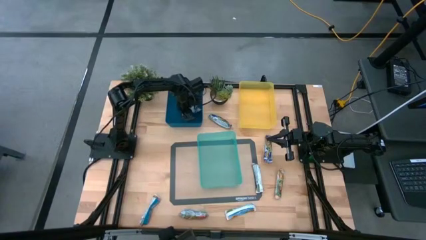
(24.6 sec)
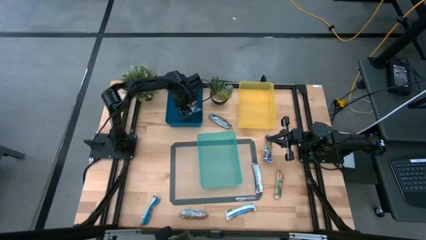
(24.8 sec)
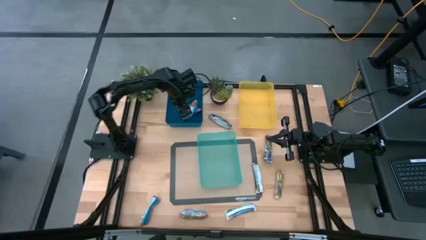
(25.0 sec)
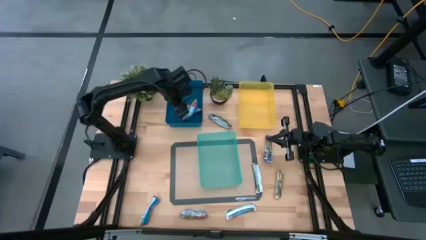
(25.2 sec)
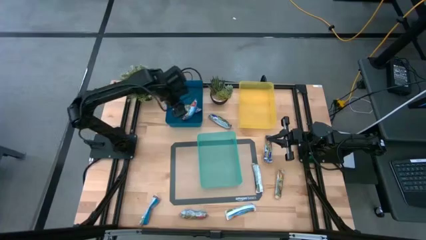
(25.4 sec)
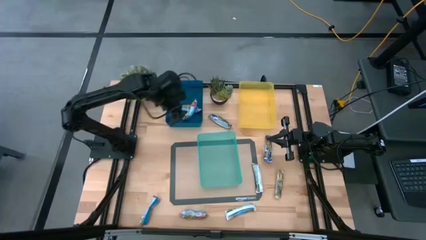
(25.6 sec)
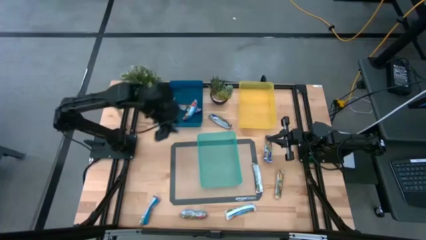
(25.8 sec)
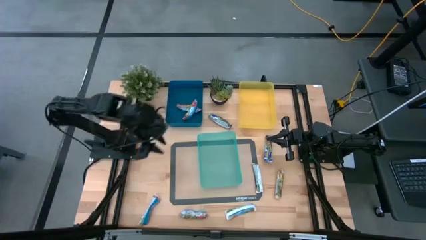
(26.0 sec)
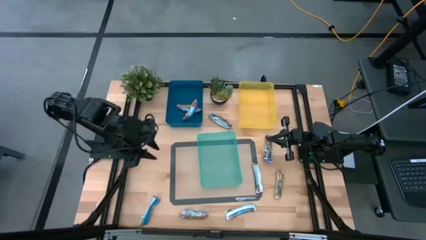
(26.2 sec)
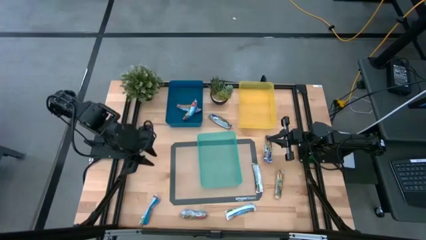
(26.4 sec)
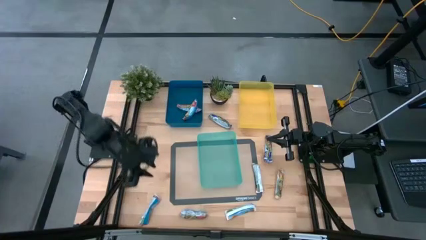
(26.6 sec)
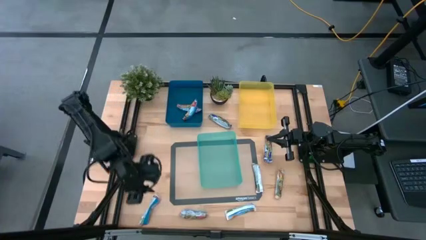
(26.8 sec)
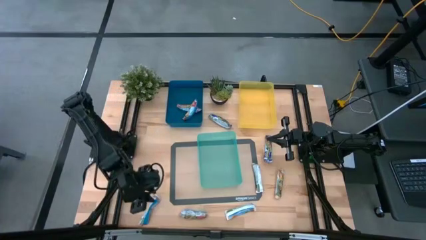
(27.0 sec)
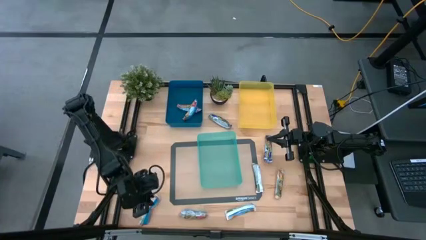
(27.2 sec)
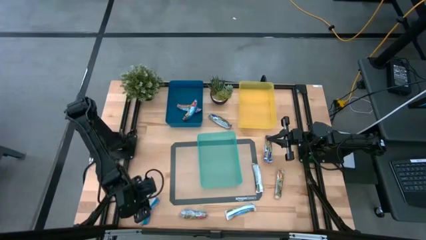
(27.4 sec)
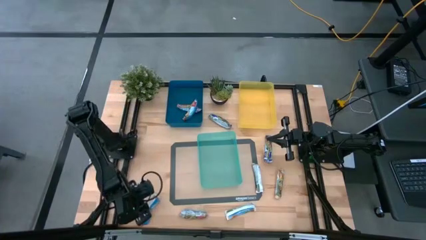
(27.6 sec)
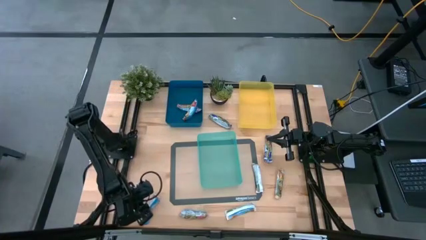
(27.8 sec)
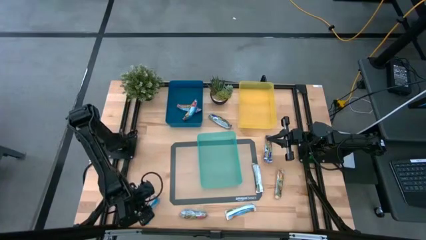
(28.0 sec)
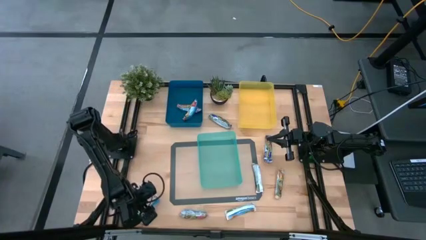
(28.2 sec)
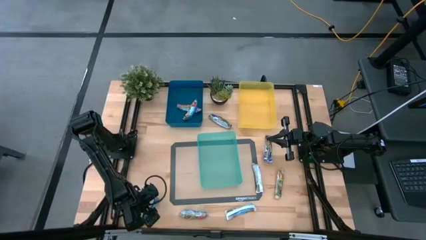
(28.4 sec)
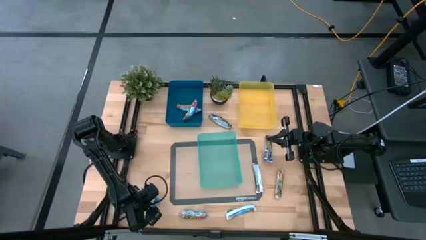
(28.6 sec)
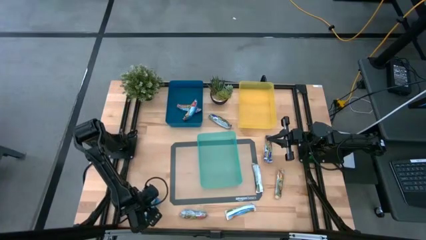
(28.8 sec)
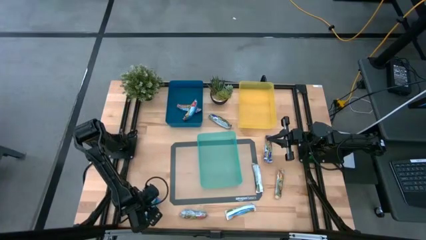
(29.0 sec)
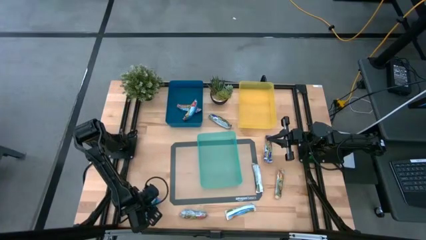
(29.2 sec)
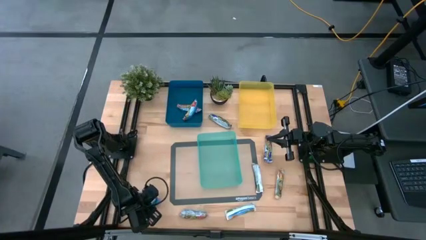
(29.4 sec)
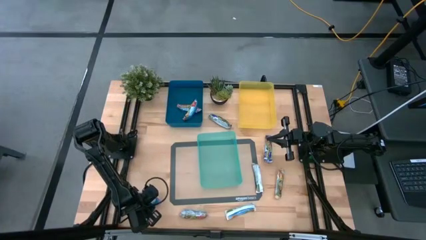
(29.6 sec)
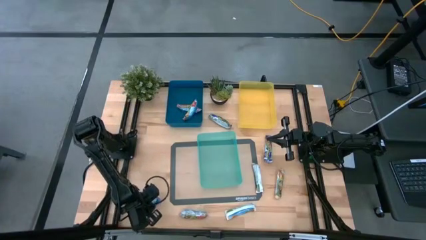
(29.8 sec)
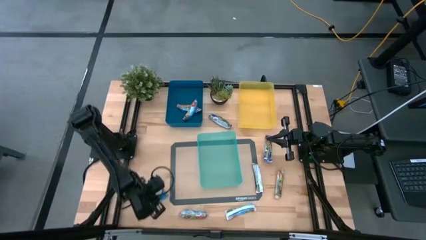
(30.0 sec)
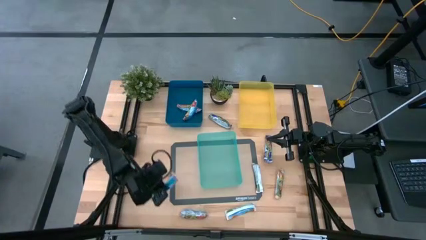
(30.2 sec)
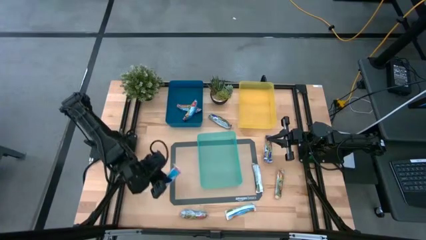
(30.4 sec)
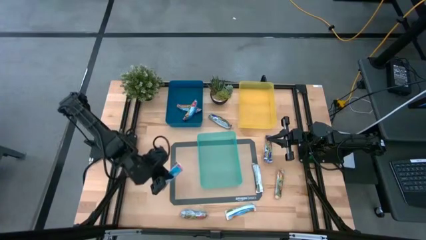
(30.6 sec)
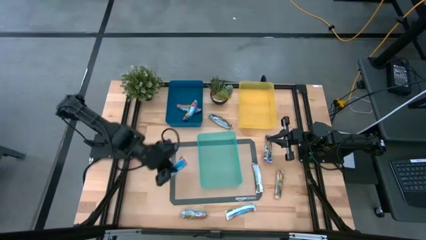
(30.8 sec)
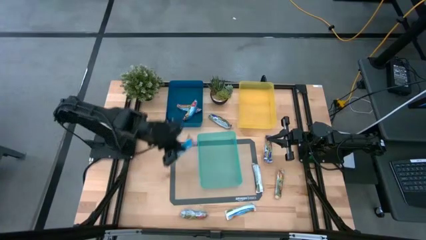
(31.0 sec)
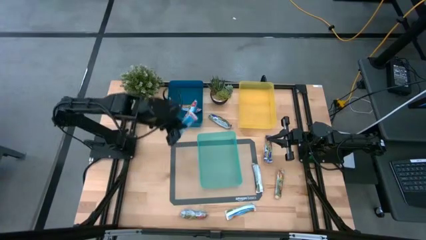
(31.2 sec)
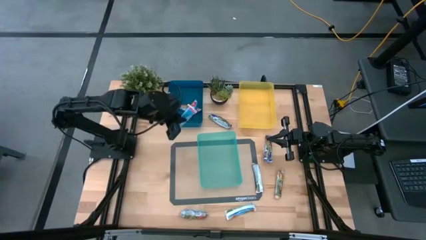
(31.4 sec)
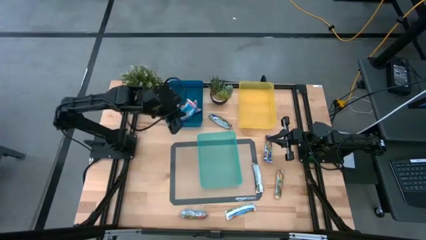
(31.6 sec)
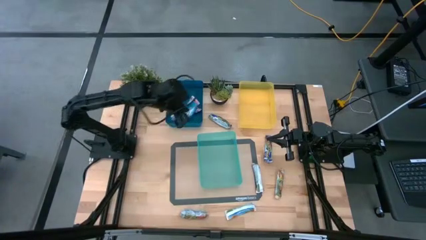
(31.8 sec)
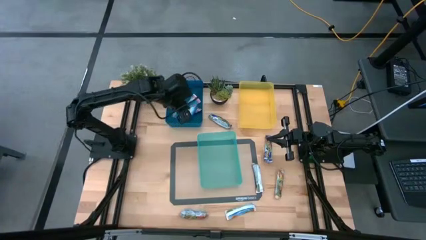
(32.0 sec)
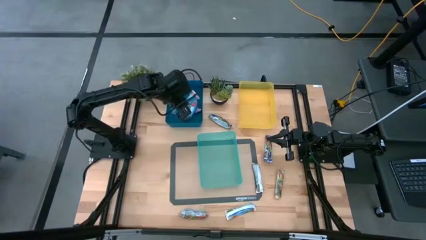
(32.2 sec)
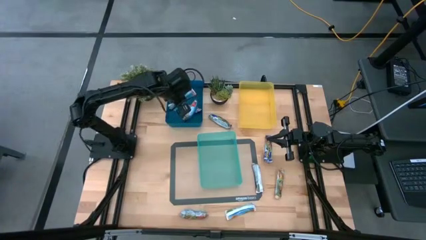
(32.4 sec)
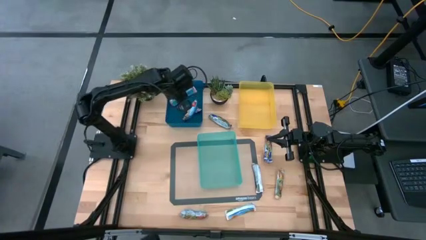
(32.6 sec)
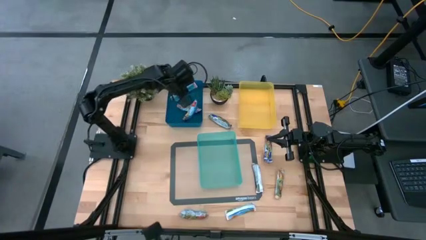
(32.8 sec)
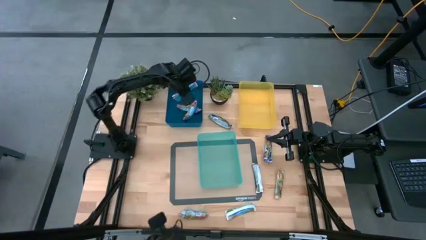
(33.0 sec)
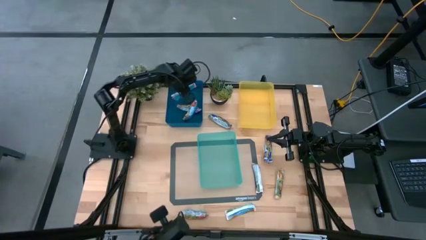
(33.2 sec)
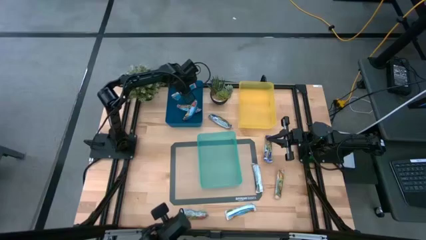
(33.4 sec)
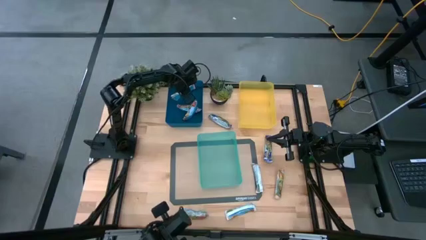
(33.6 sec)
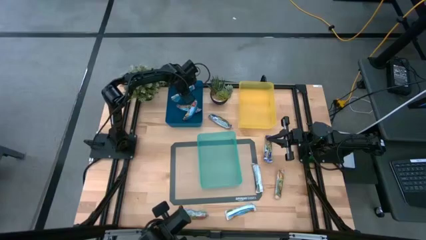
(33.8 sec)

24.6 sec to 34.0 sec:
Task: Pick and place Granola Bars by type
Put the red granola bar into the dark blue bin

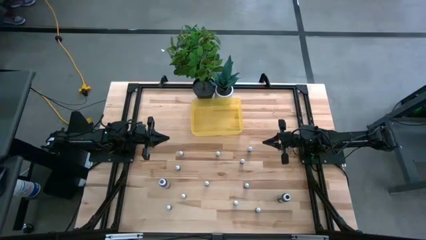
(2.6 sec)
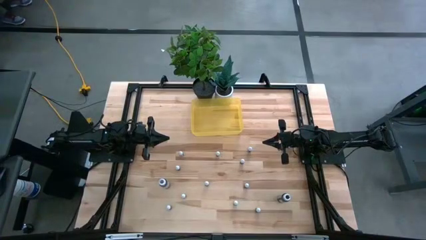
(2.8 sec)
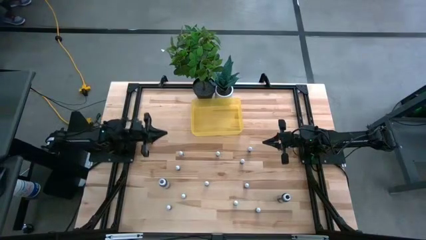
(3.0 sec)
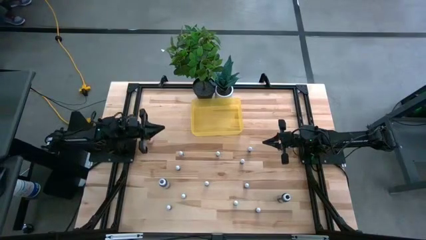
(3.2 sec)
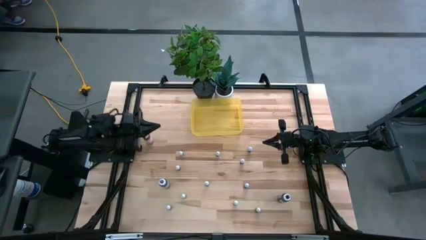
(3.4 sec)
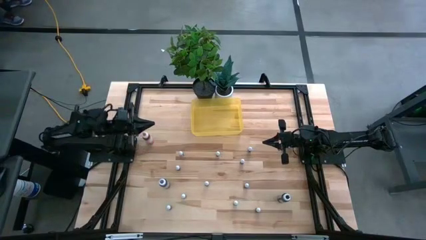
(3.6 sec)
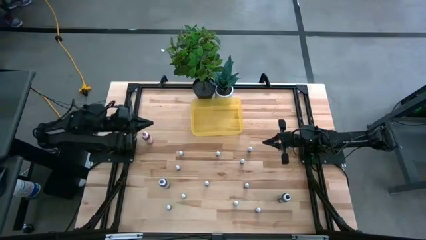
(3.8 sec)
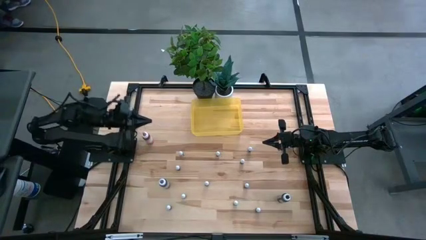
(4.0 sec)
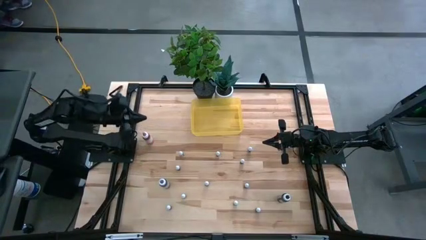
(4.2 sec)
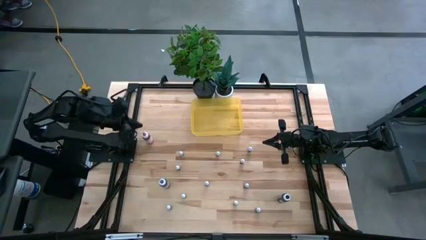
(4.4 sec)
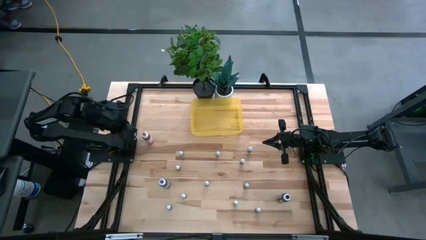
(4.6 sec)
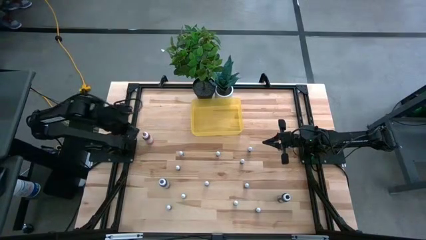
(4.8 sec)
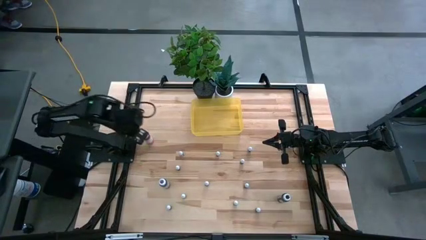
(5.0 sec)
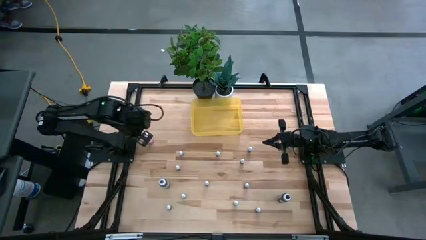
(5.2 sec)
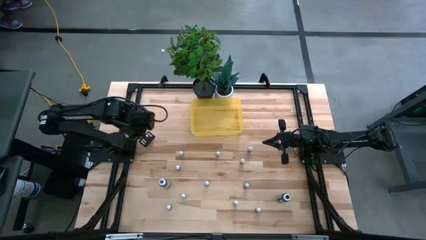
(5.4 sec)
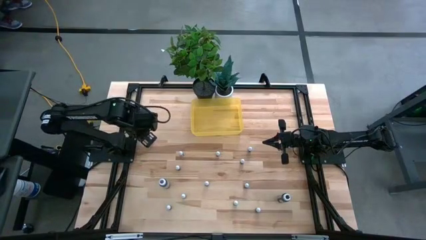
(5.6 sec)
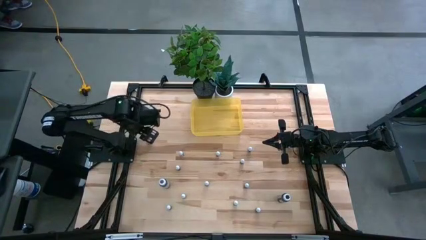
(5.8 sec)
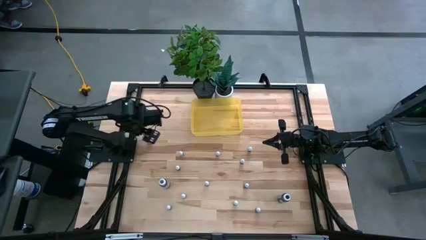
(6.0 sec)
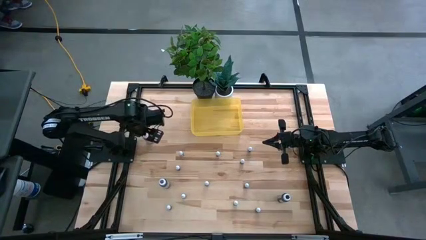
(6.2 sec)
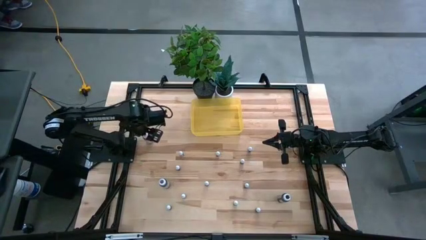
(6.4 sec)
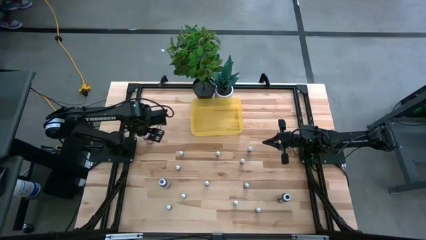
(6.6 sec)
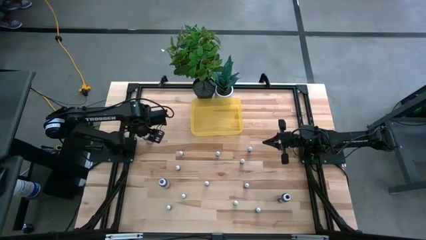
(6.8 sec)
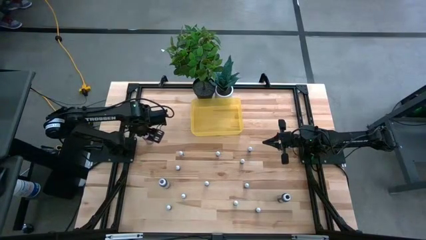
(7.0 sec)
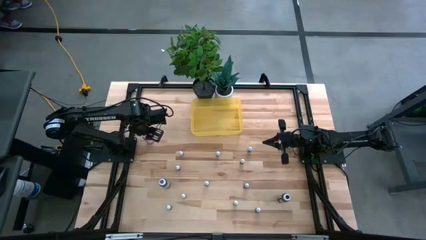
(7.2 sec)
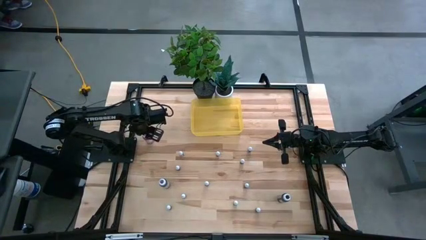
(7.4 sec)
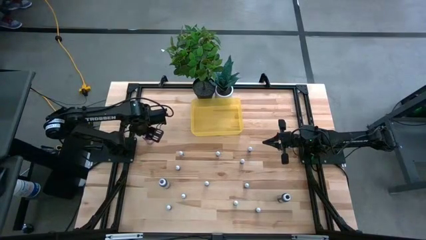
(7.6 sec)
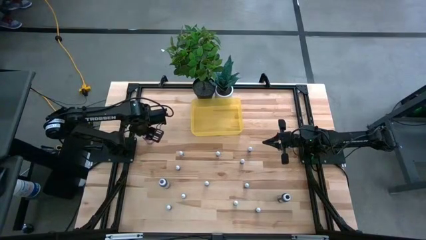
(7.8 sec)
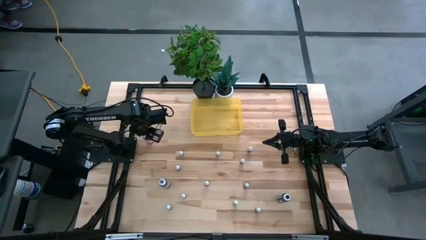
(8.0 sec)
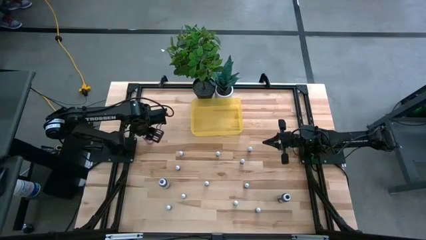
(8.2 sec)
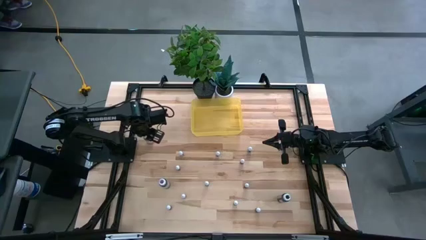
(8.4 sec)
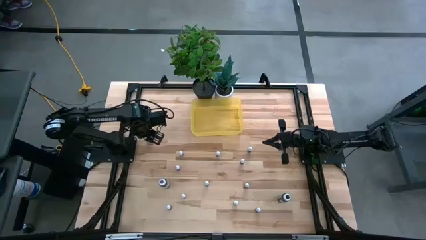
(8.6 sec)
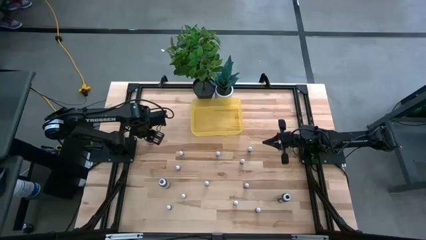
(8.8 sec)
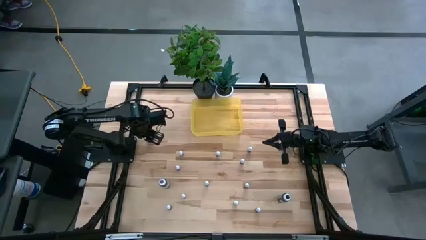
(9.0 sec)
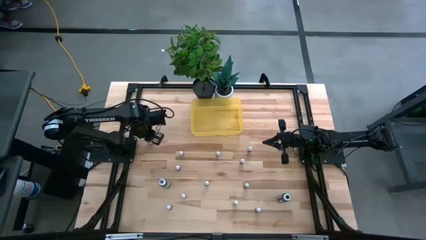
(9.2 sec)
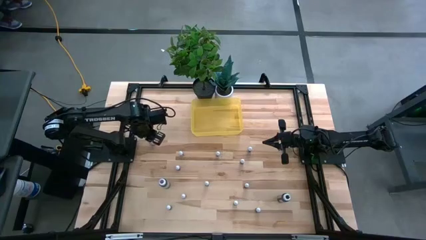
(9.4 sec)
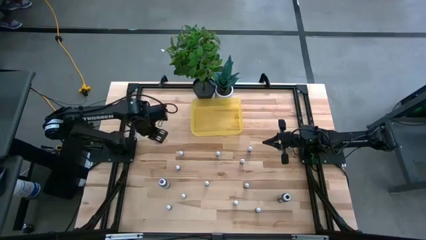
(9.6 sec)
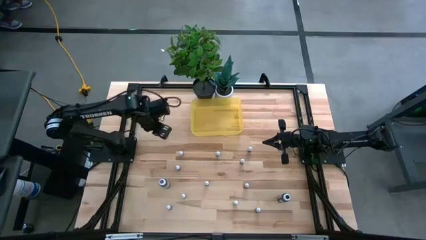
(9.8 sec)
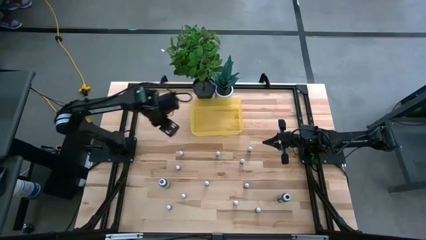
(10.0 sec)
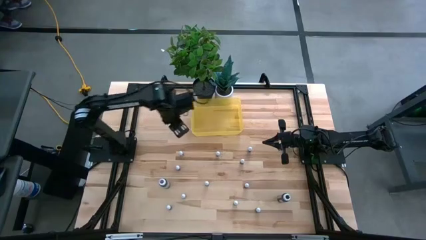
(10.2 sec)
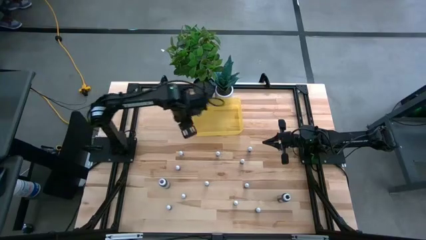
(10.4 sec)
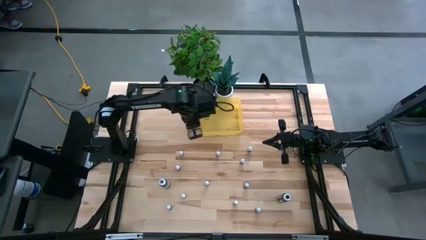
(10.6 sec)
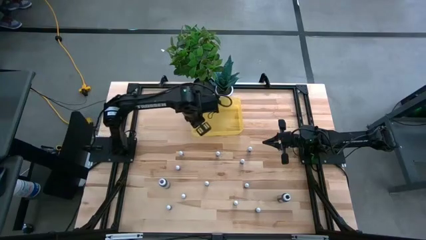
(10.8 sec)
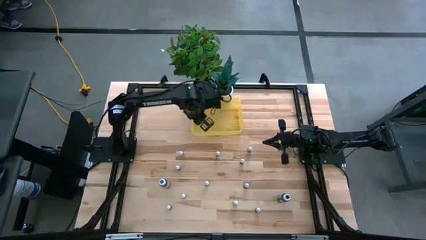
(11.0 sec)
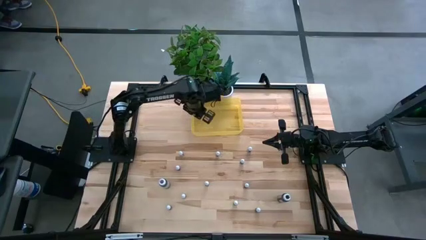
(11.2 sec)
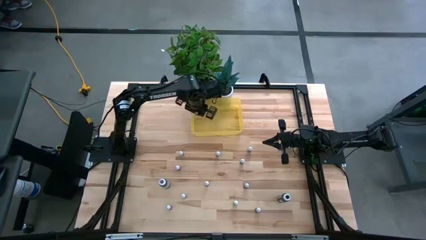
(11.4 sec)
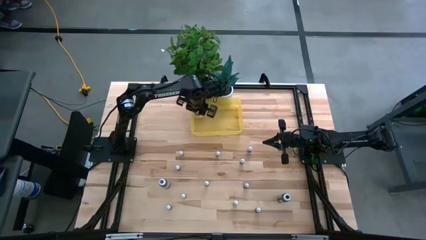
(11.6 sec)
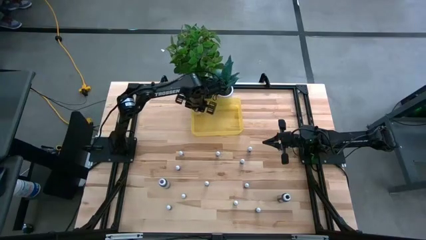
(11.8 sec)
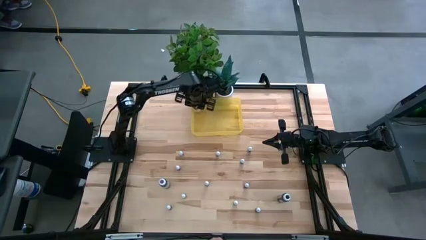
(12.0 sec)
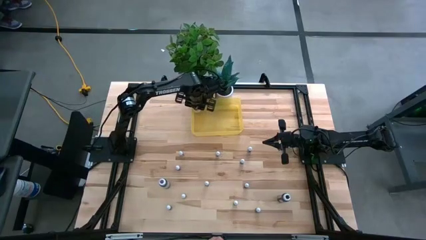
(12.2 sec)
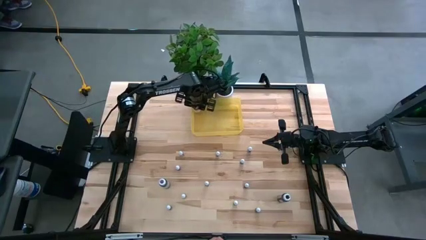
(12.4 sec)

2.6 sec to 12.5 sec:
Task: Pick & Place food coloring
Put the large pink food coloring bottle into the yellow bin
